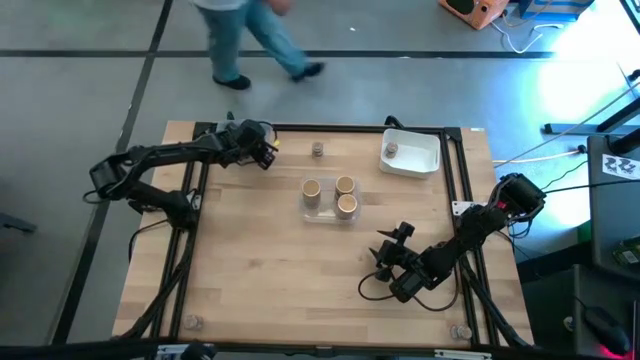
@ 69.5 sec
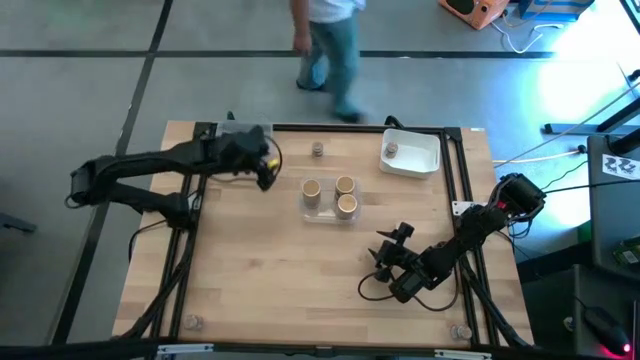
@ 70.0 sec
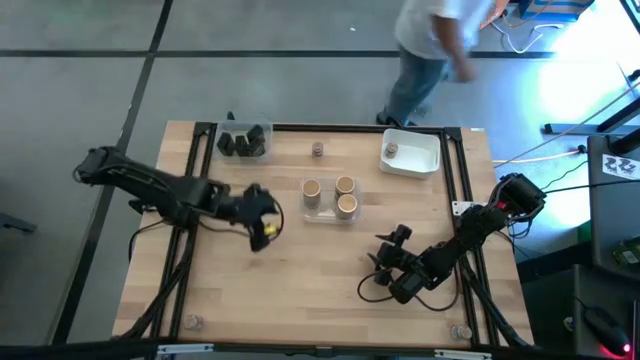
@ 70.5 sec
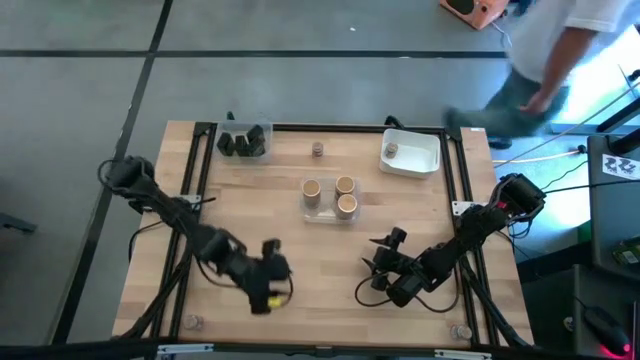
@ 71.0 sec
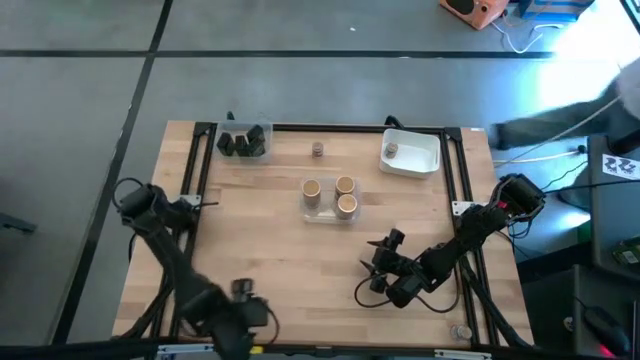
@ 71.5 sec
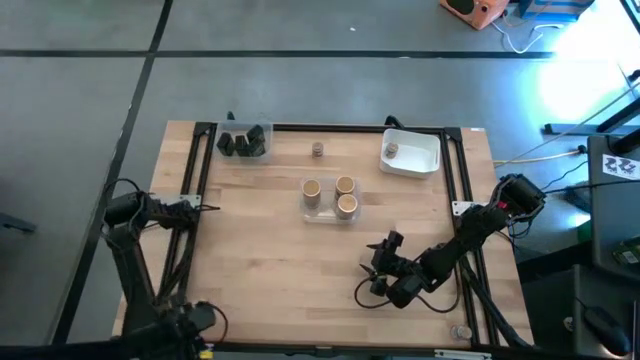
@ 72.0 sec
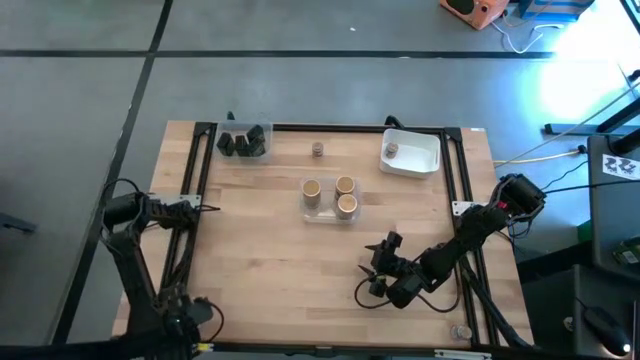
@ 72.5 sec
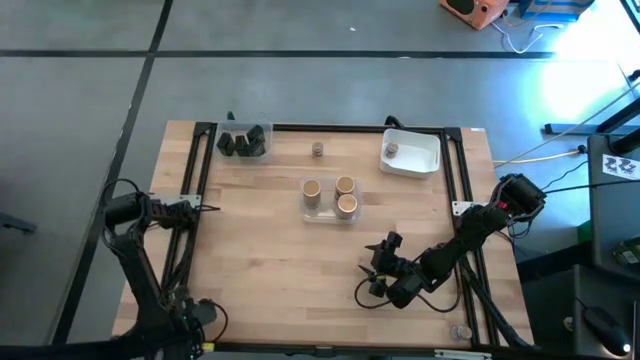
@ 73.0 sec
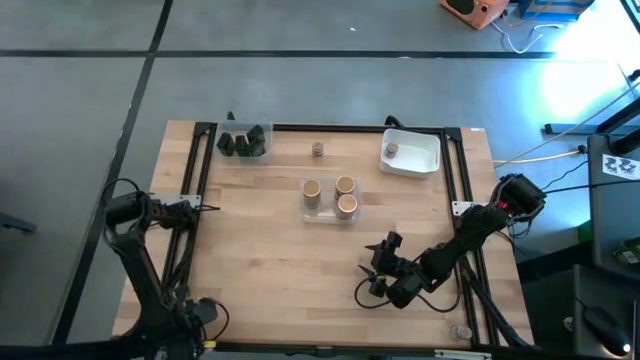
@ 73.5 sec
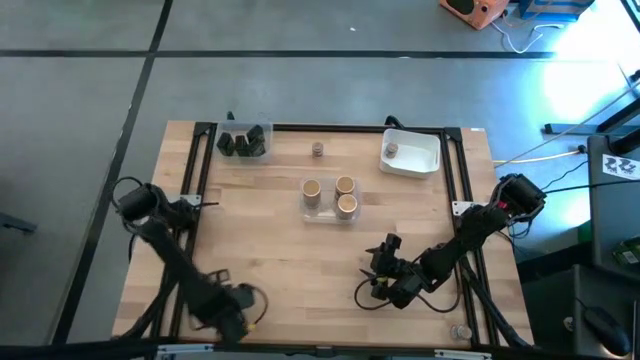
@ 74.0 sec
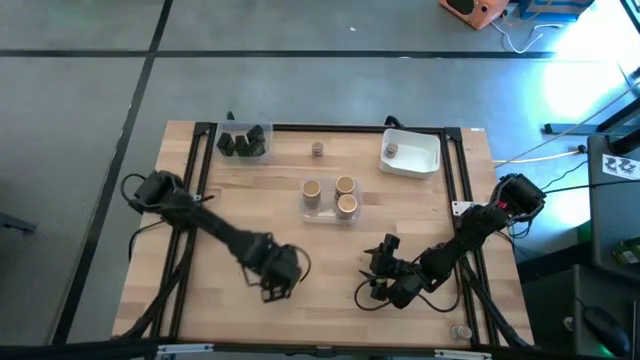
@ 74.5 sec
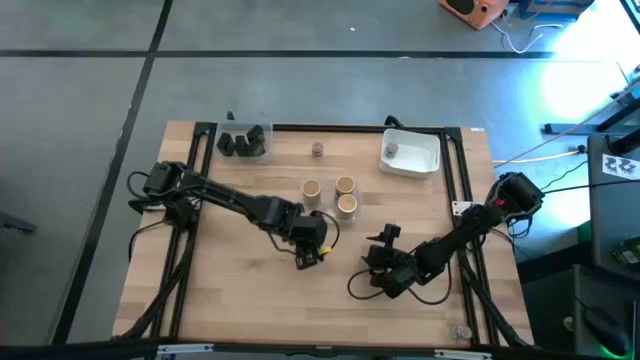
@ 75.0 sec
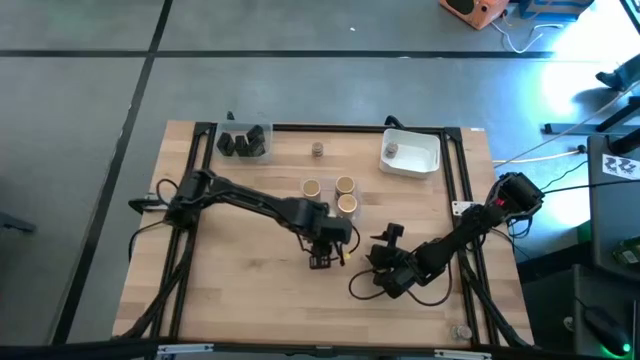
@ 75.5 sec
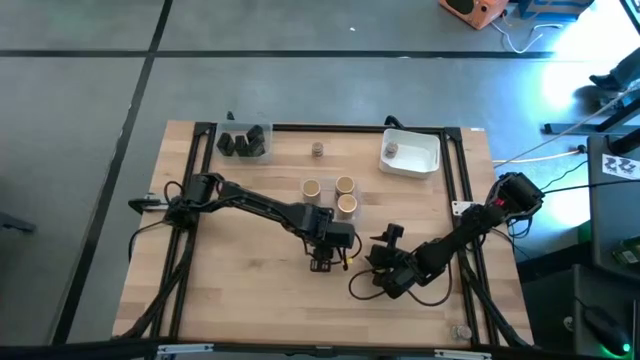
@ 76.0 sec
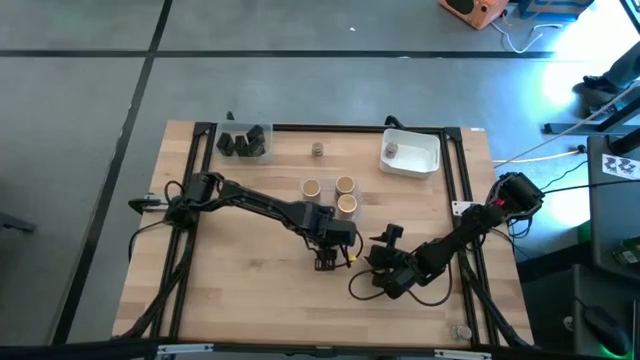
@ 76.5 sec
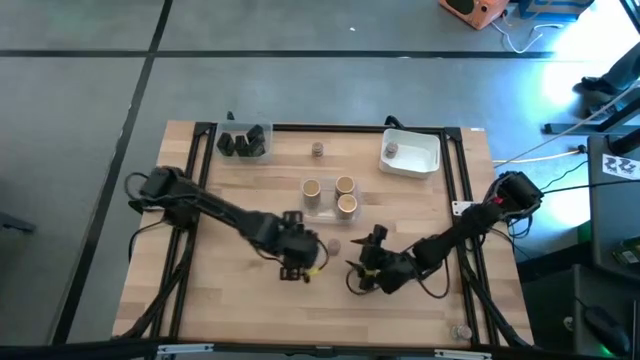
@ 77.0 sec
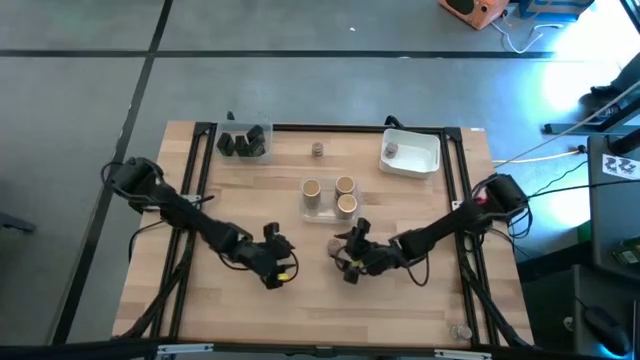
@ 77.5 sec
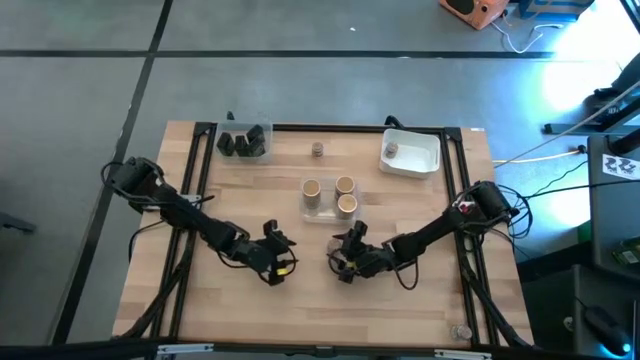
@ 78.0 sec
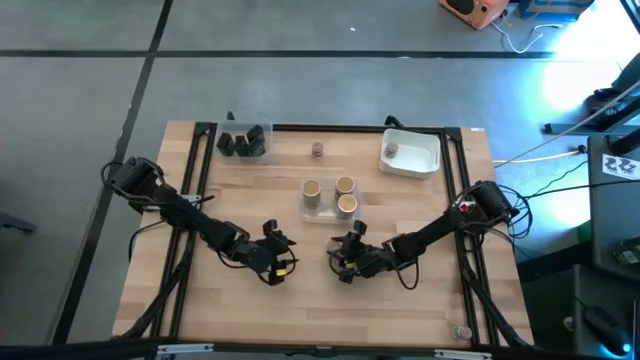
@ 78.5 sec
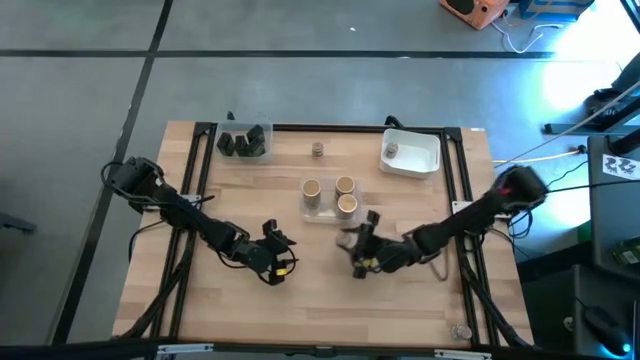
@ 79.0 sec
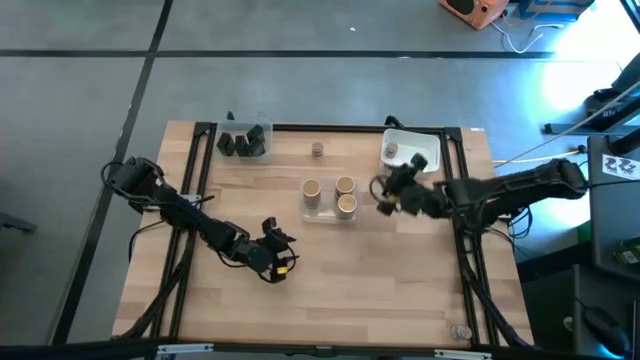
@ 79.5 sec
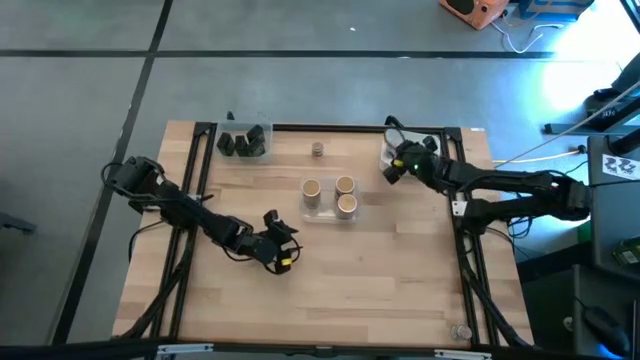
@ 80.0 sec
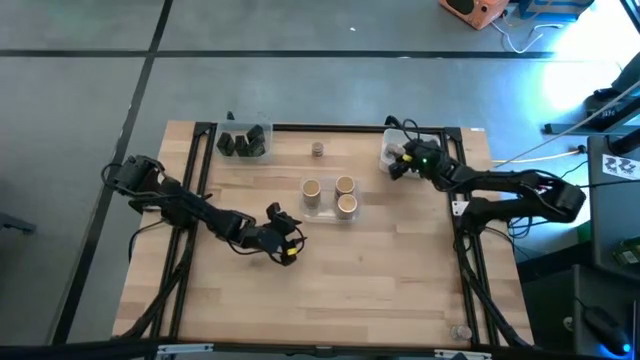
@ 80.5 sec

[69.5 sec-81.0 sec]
Task: Sort spices by type
Put the brown seasoning bottle into the white bin

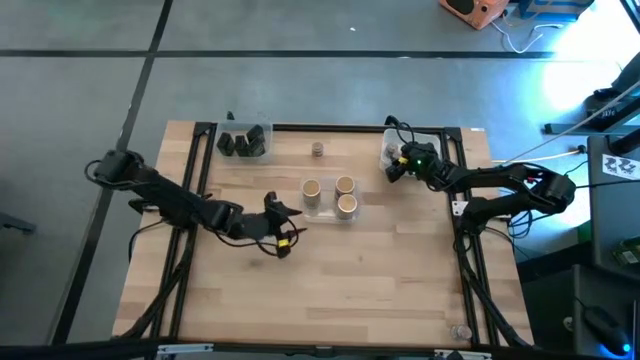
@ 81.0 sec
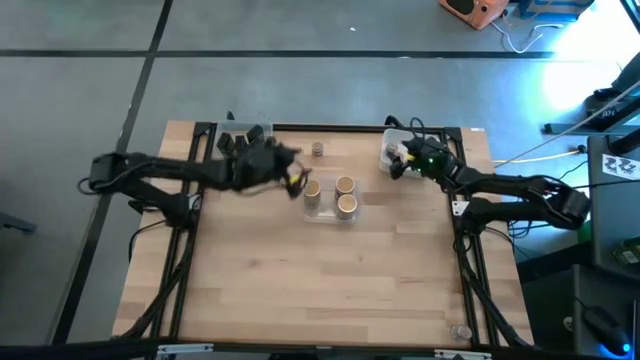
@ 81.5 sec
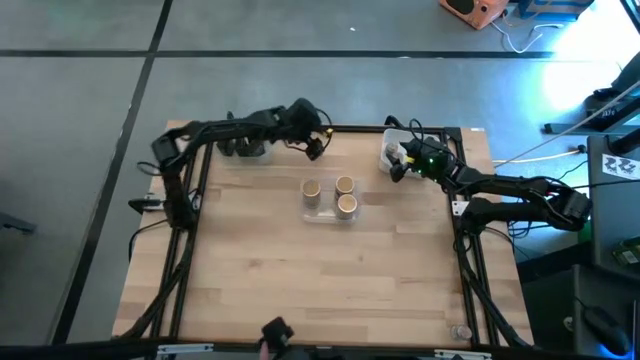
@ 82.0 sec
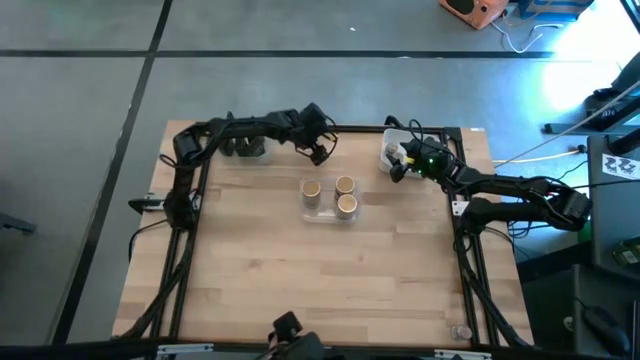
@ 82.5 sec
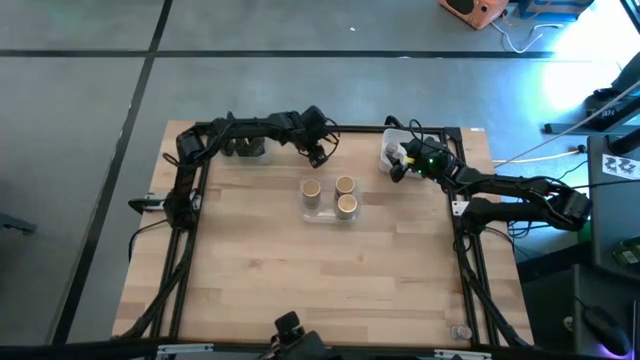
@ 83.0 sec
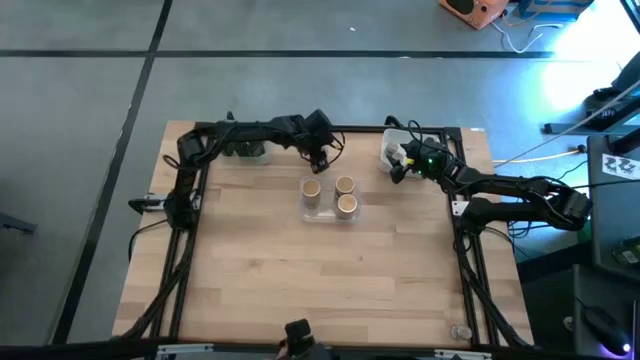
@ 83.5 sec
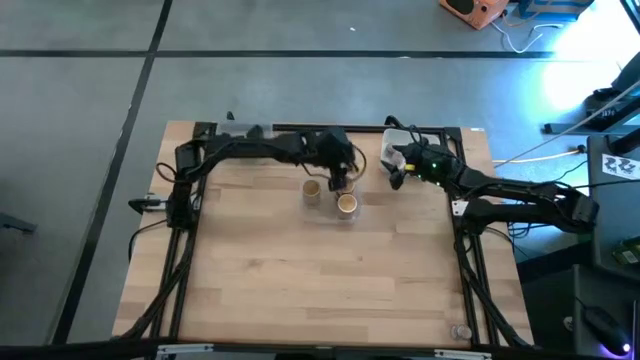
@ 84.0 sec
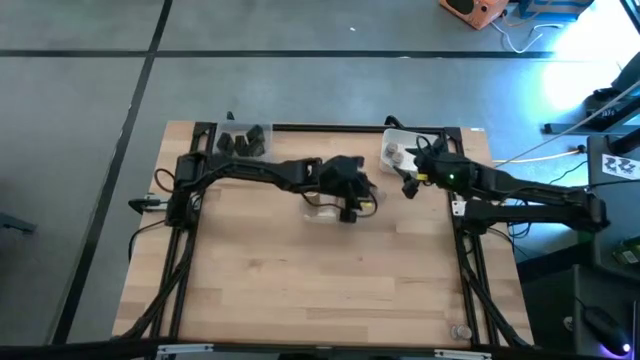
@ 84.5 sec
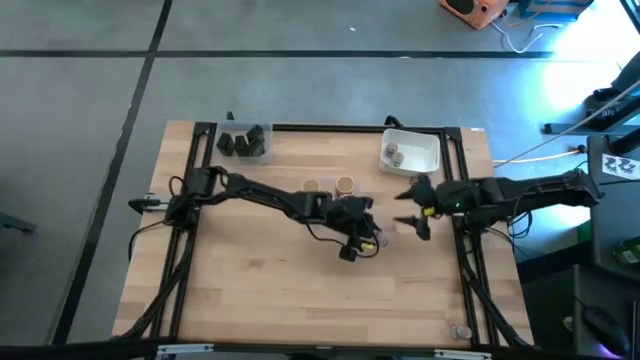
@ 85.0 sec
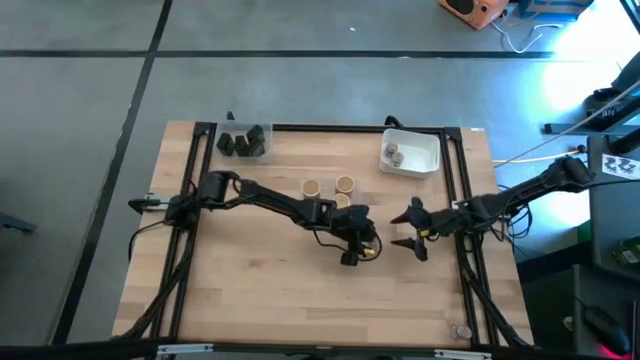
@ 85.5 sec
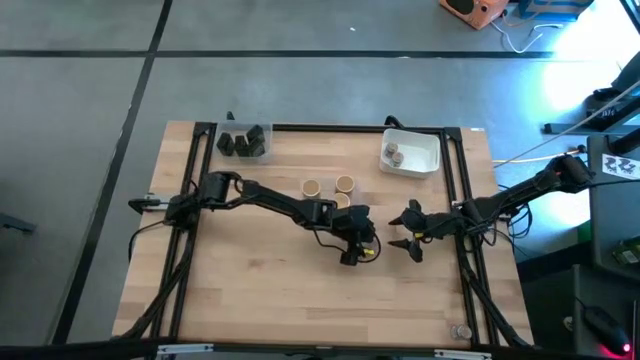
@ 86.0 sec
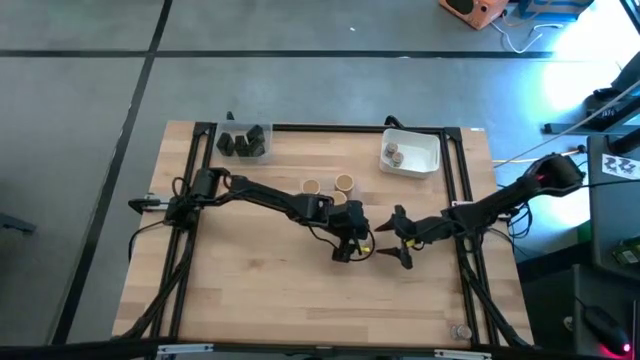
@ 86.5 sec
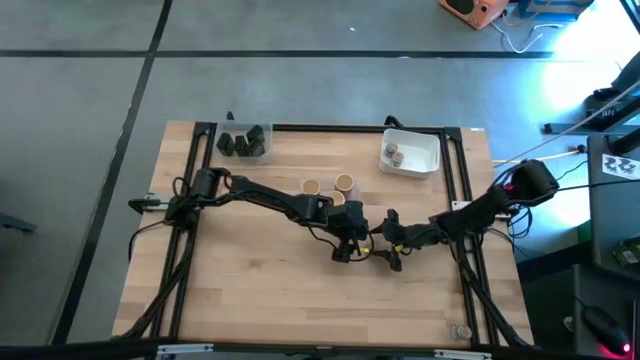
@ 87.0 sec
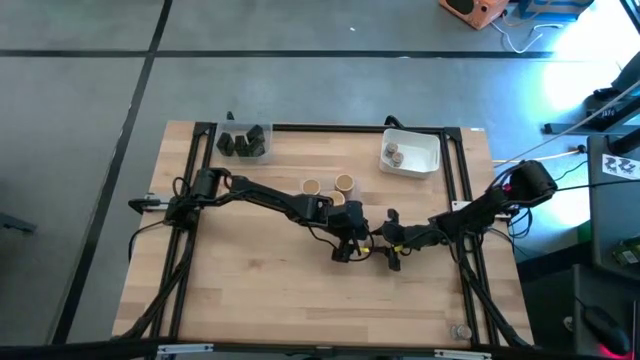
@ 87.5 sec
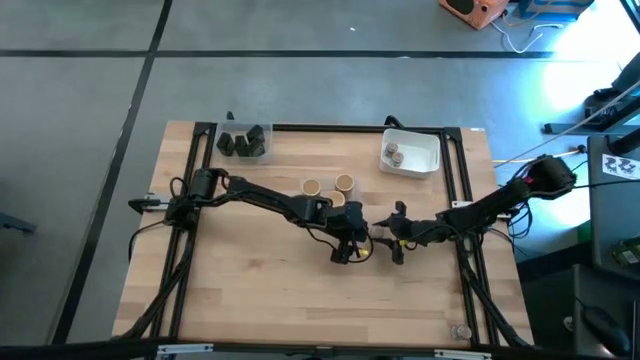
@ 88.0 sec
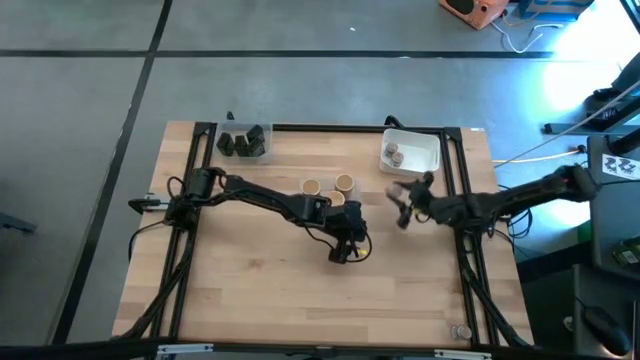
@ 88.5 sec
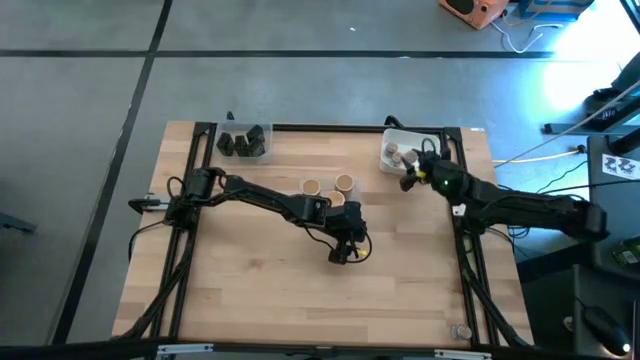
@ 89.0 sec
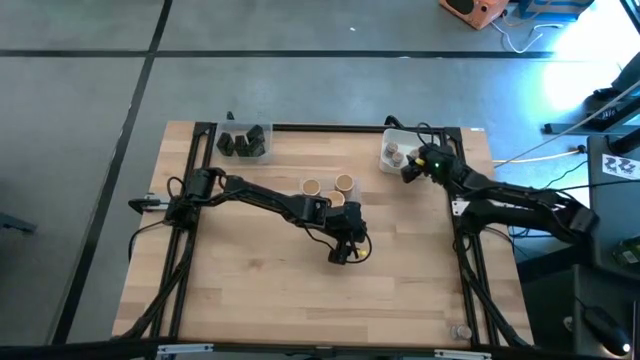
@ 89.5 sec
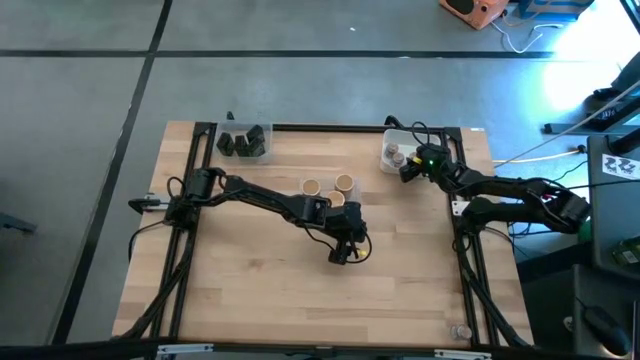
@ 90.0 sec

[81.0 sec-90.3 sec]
Put the brown seasoning bottle into the white bin
